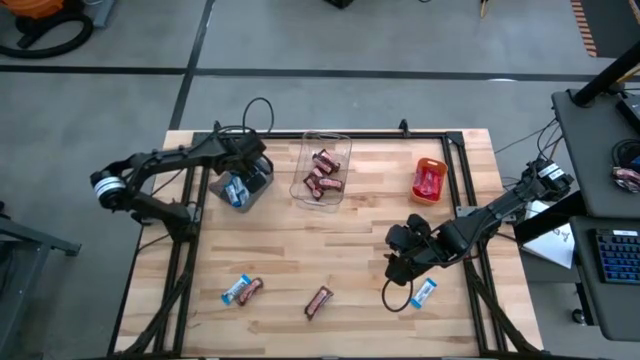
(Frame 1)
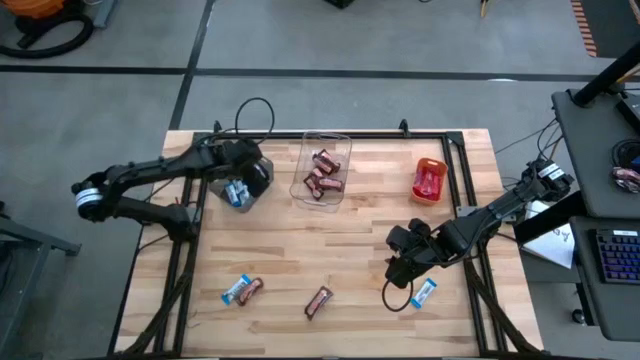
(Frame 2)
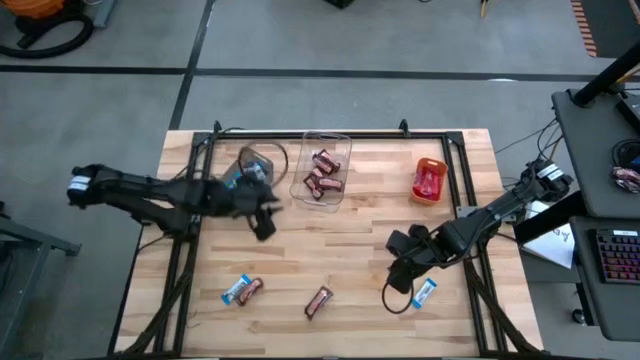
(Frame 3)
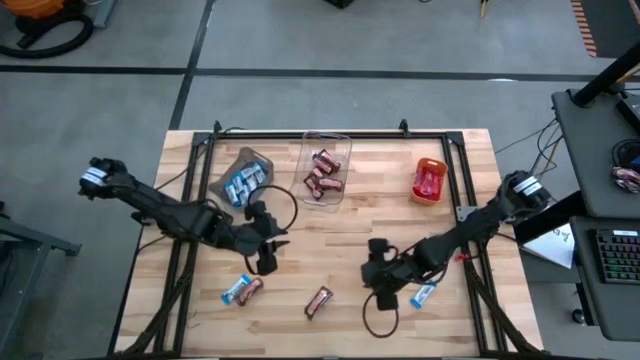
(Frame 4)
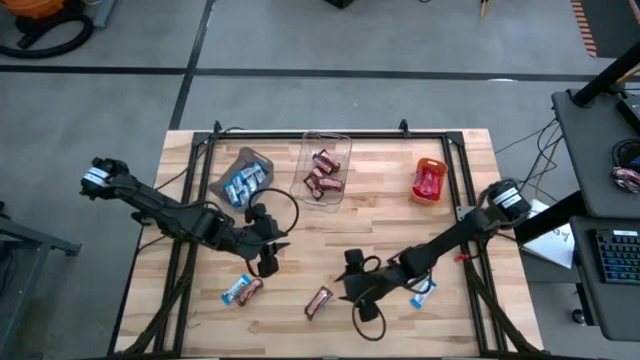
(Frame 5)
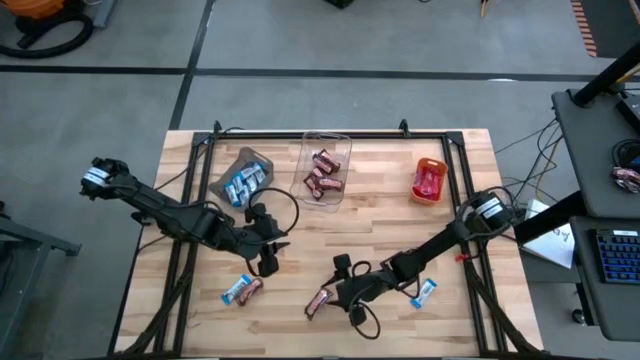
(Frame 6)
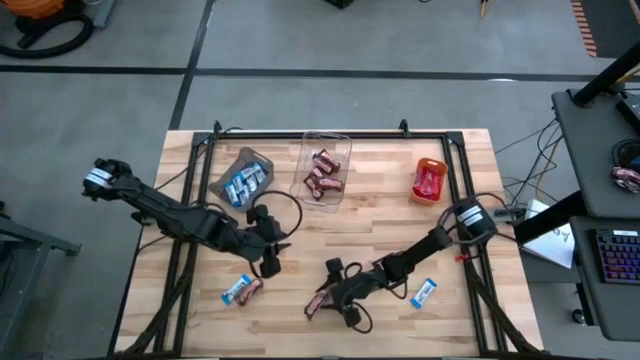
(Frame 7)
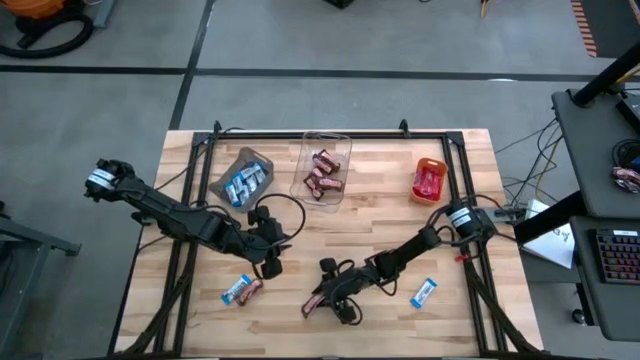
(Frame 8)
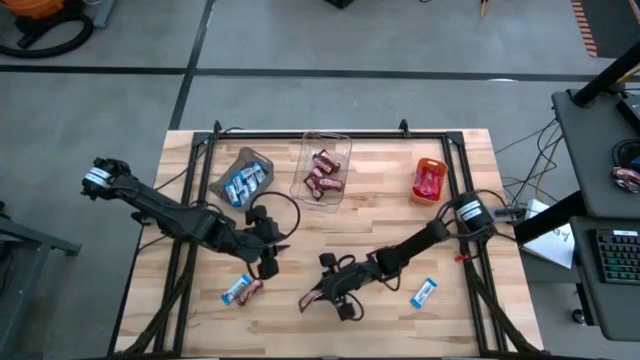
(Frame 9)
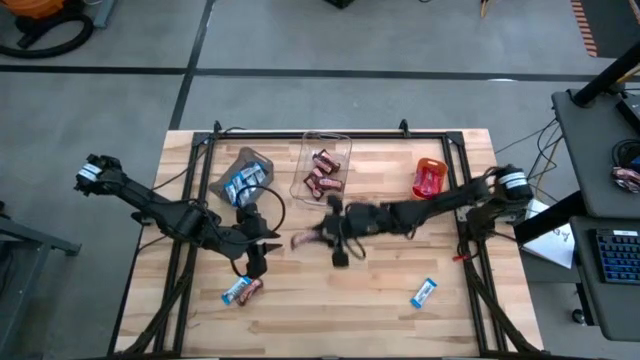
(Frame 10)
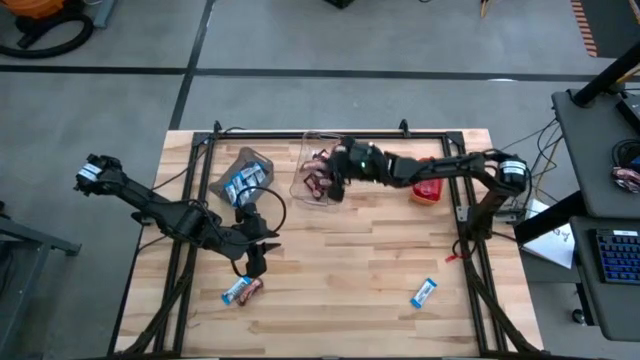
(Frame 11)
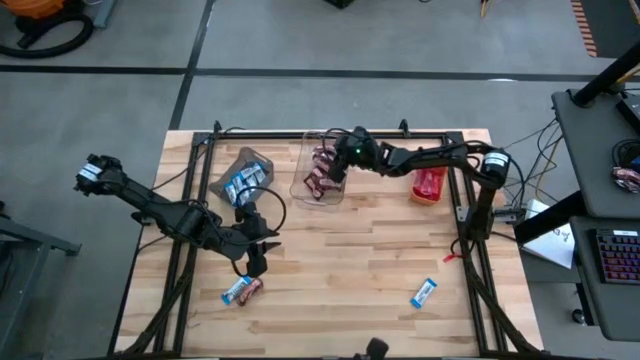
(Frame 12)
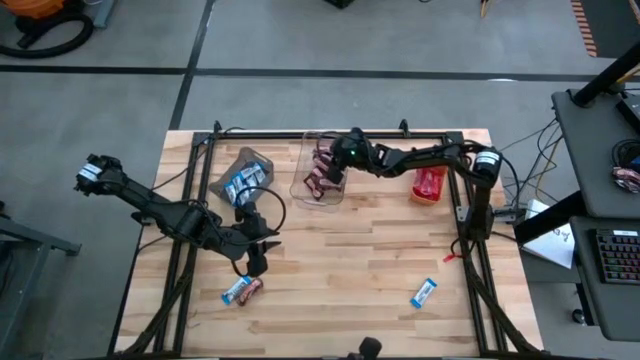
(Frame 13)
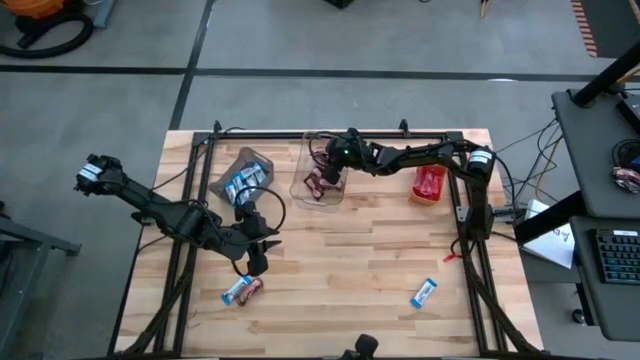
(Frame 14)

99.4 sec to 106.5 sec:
Task: Sort candy
Put the brown chocolate into the transparent bin

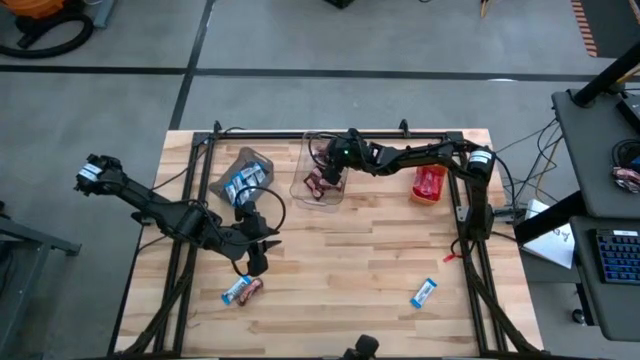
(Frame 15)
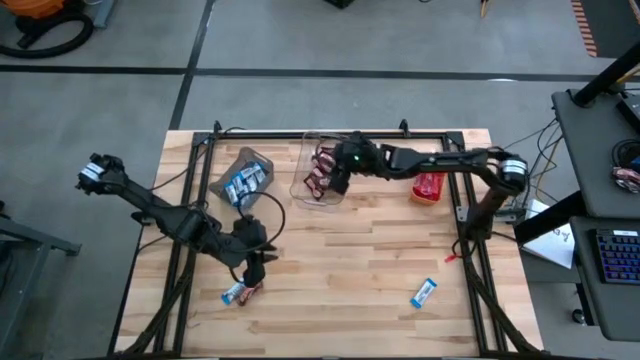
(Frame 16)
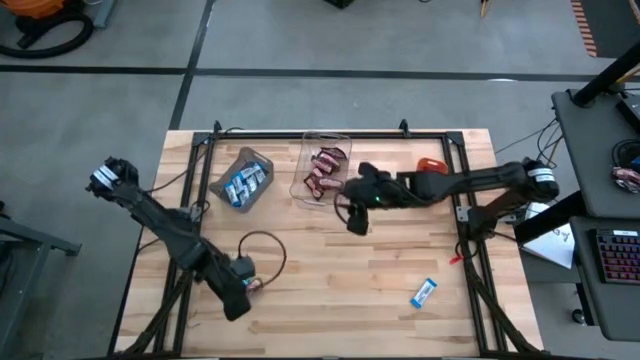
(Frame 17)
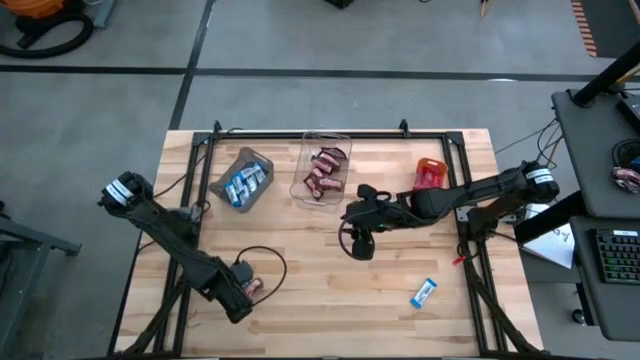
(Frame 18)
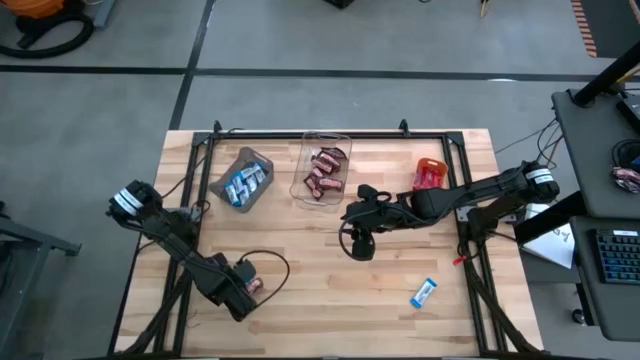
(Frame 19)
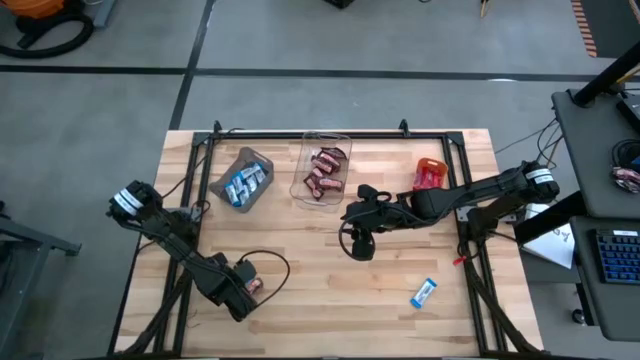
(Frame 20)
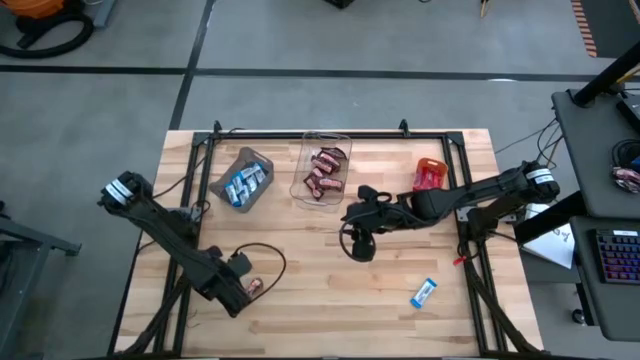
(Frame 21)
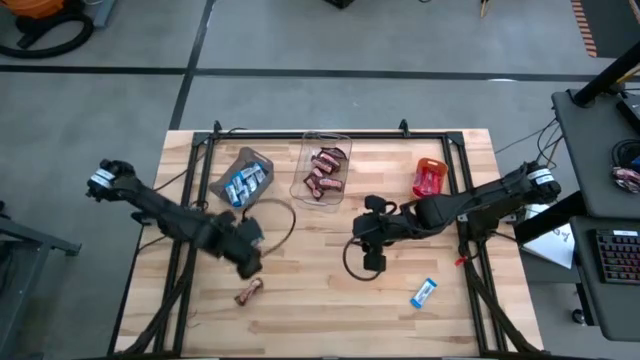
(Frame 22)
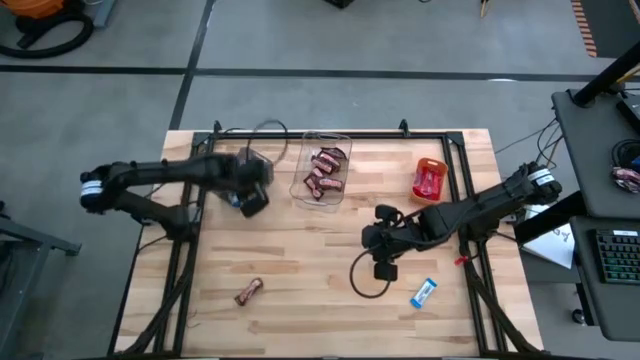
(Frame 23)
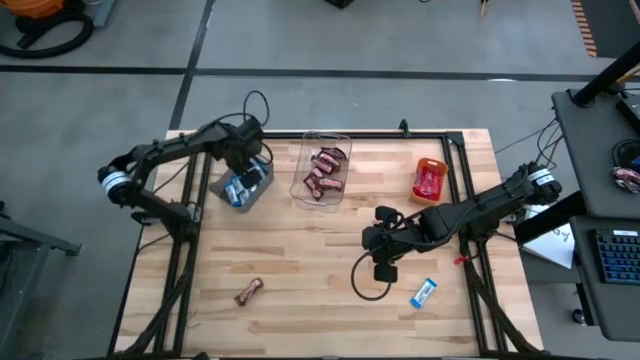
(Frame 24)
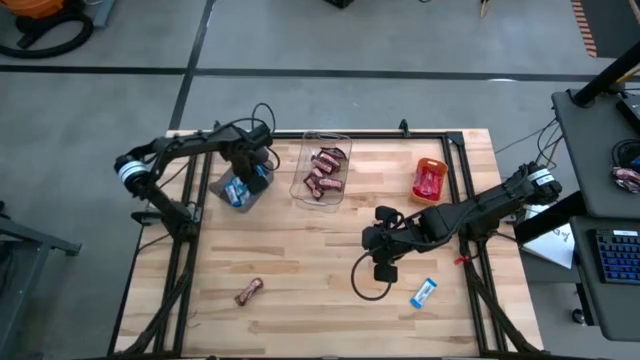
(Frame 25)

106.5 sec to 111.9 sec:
Put the blue chocolate into the black bin

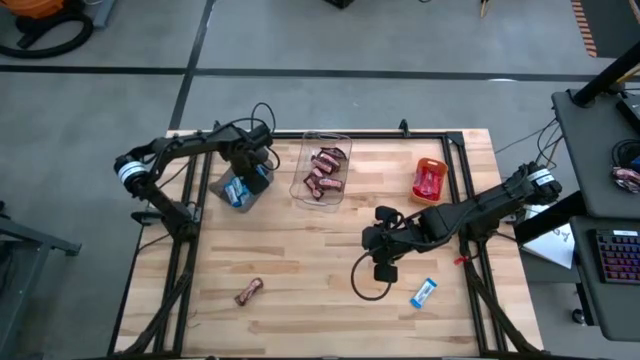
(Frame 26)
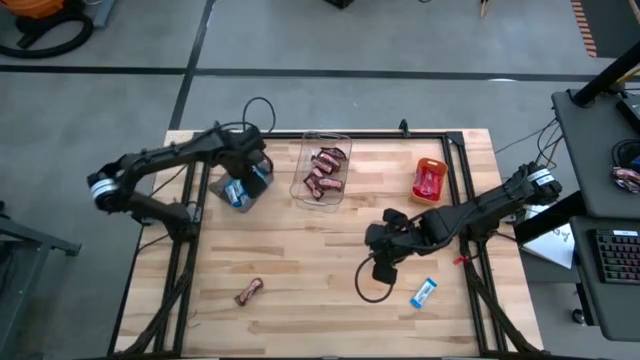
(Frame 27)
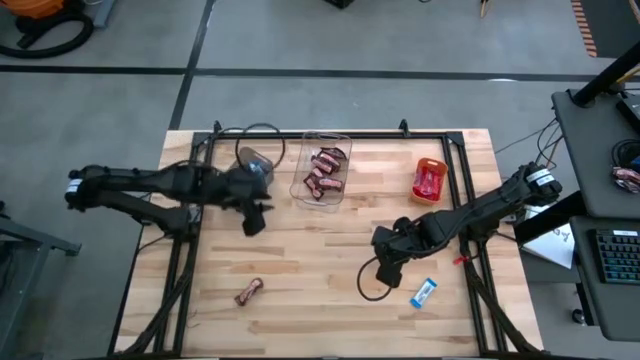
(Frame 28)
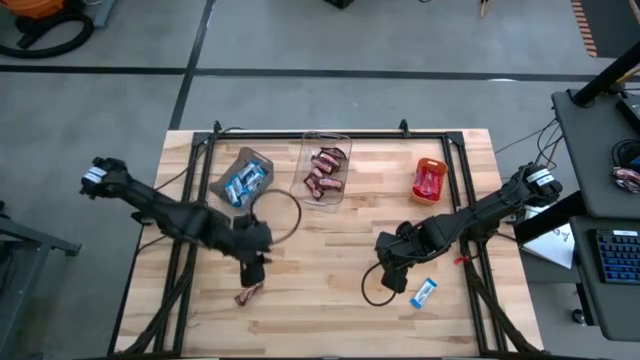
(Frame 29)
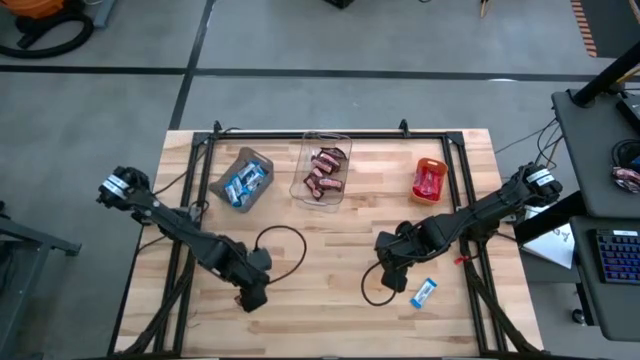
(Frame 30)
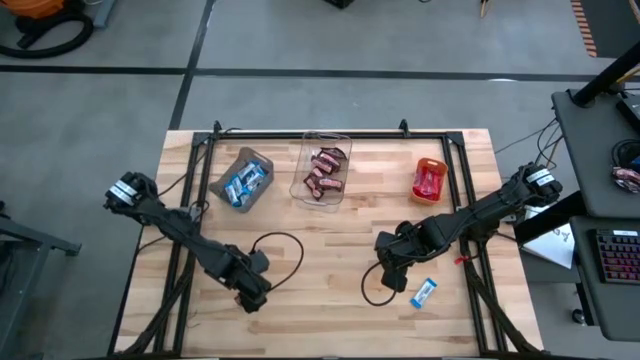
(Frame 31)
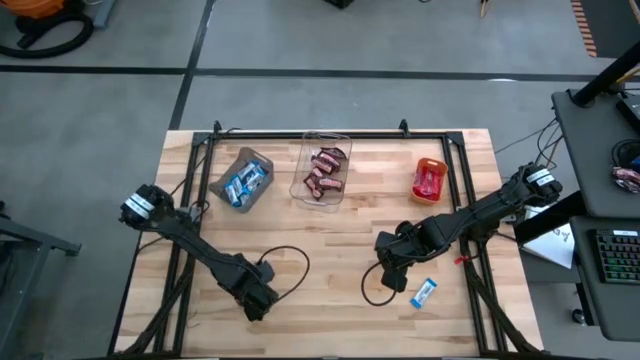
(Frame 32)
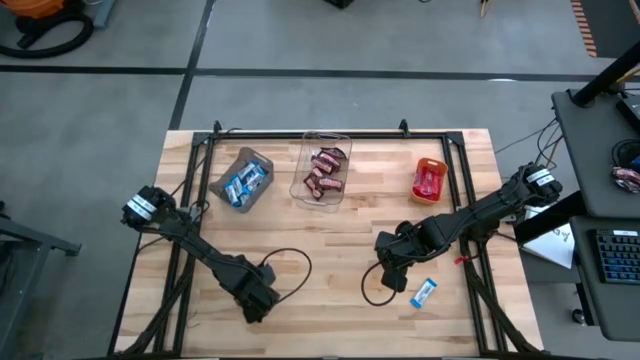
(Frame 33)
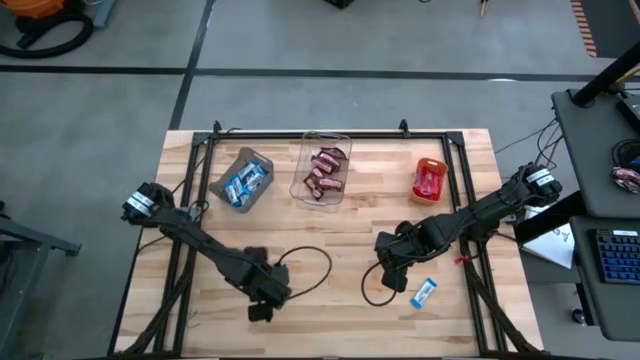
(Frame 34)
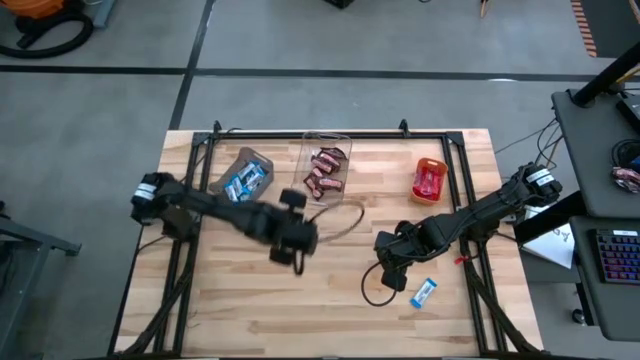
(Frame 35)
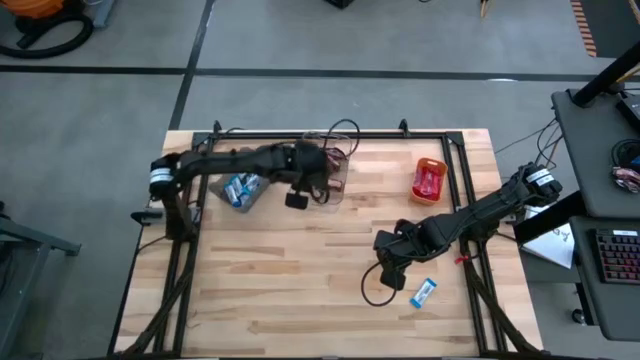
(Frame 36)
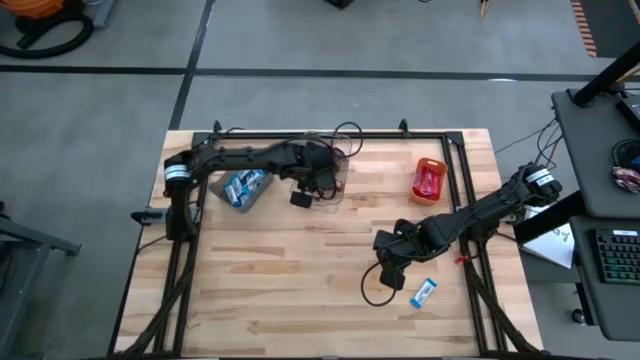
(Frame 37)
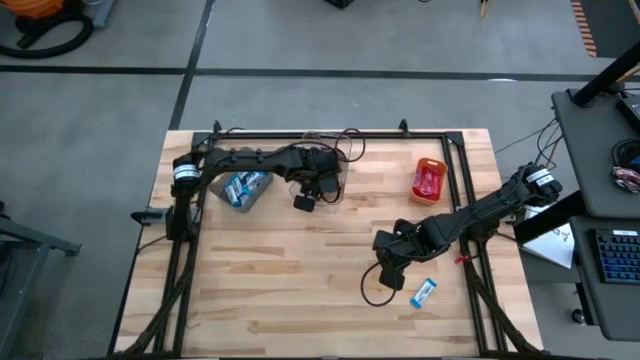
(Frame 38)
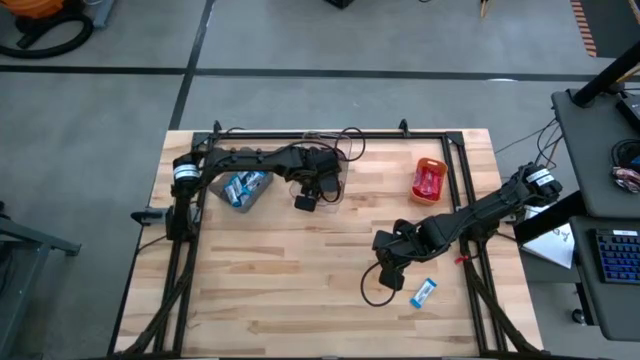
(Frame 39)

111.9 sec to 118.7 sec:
Put the brown chocolate into the transparent bin

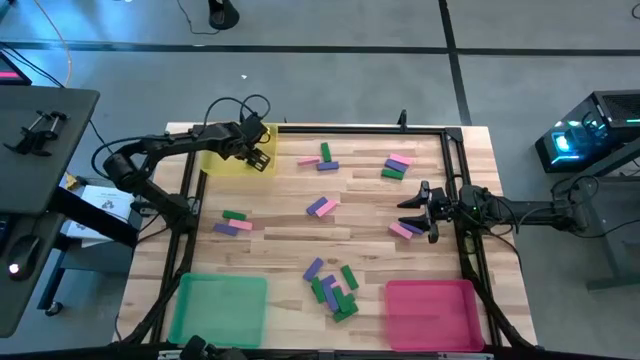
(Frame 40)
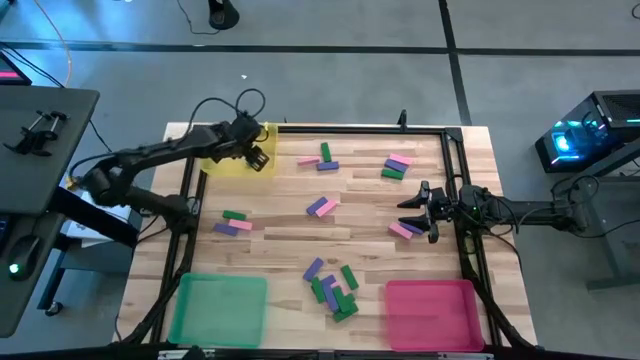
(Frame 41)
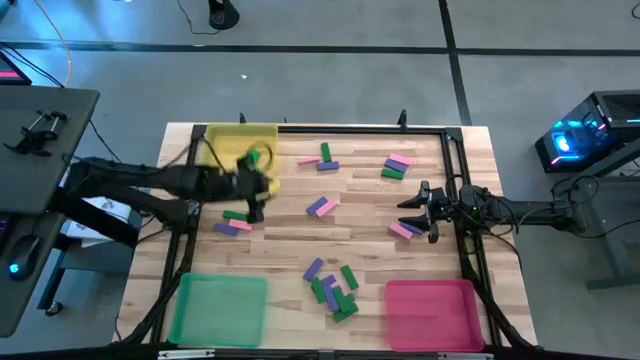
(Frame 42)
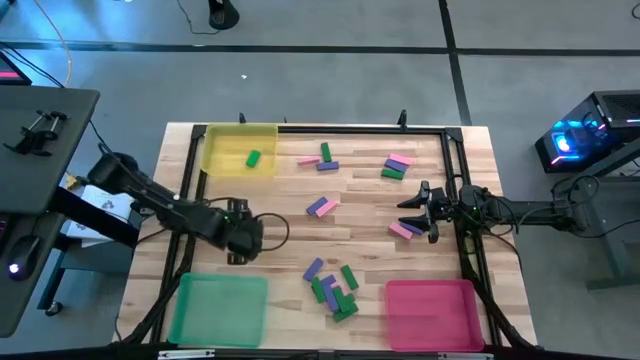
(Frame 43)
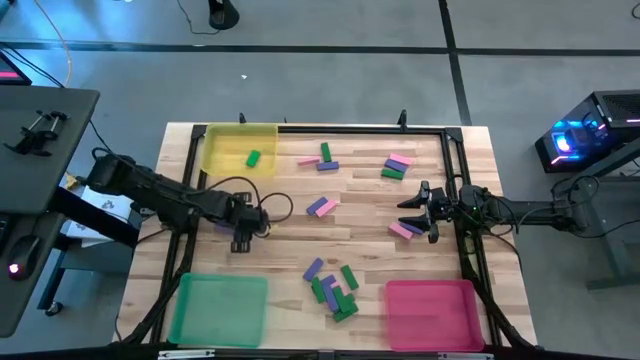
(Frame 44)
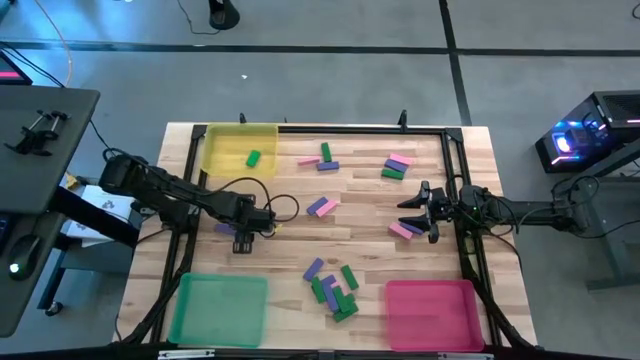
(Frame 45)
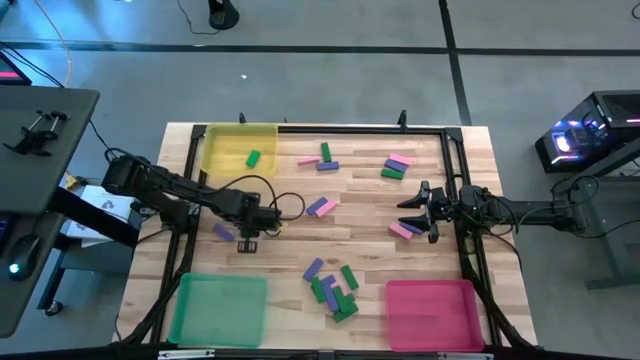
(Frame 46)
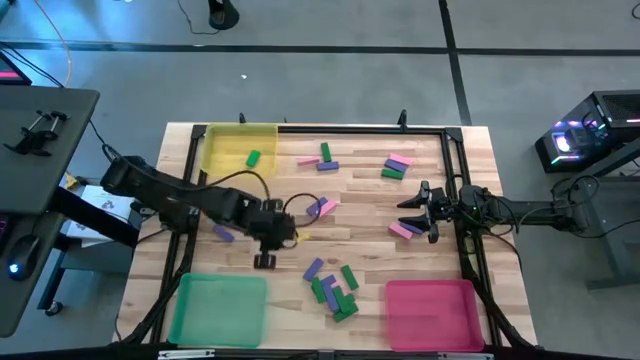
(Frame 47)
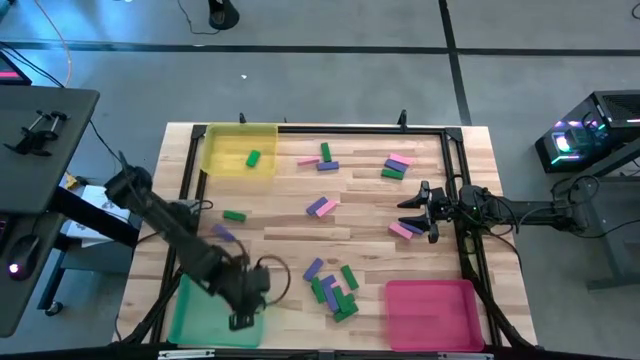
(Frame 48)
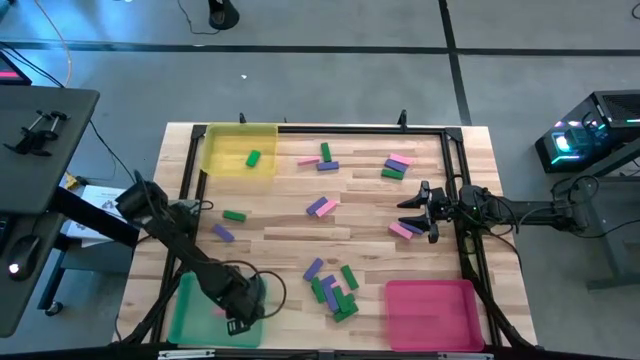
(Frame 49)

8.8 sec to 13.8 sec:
Task: Sort blocks
Put the pink block into the green bin
